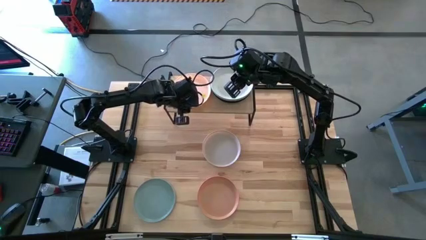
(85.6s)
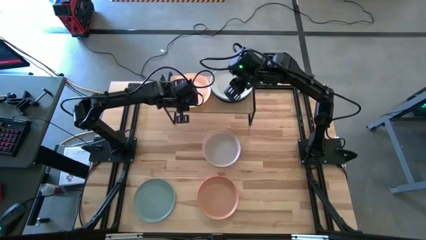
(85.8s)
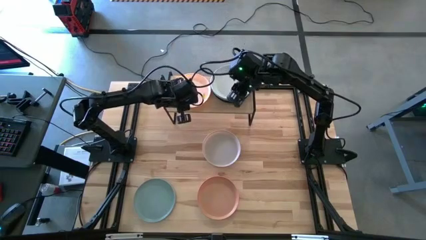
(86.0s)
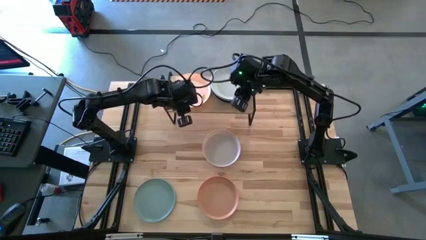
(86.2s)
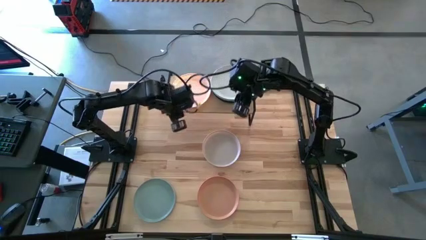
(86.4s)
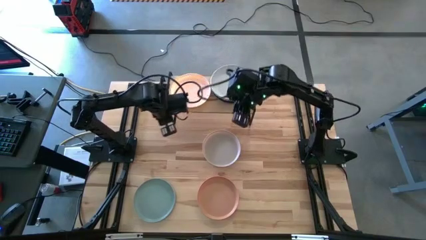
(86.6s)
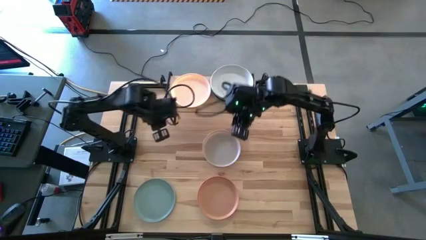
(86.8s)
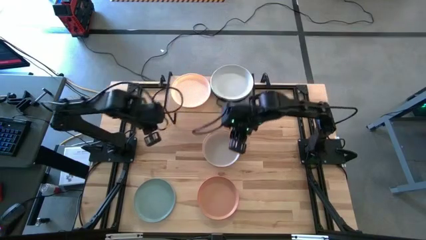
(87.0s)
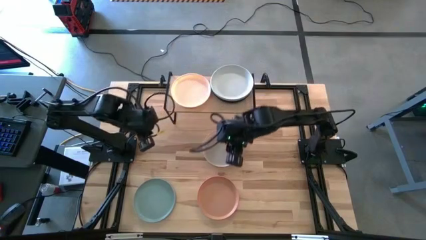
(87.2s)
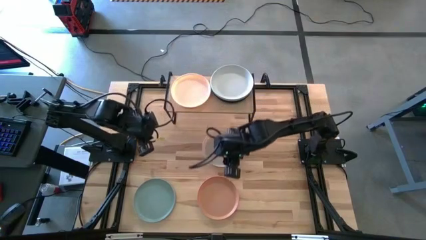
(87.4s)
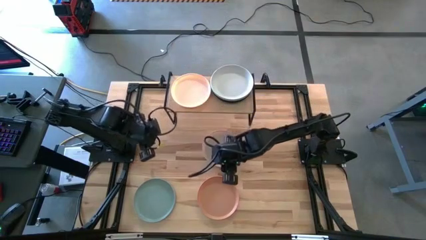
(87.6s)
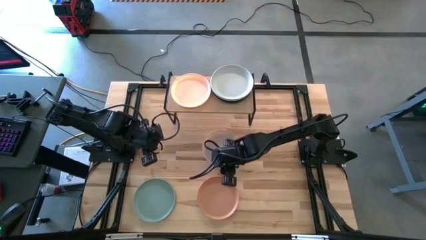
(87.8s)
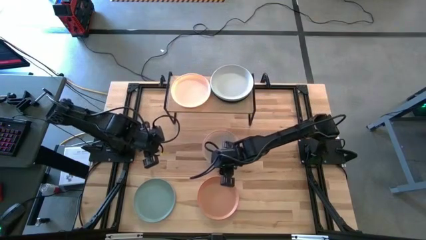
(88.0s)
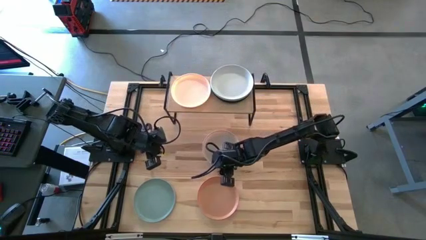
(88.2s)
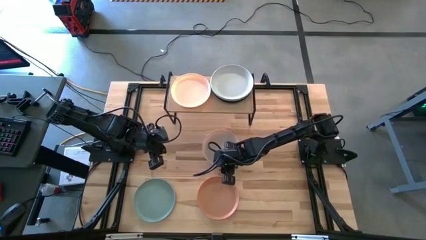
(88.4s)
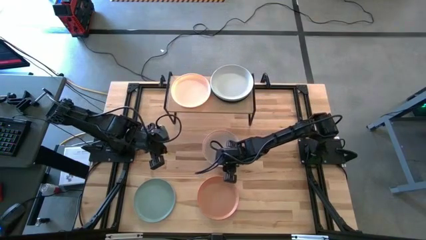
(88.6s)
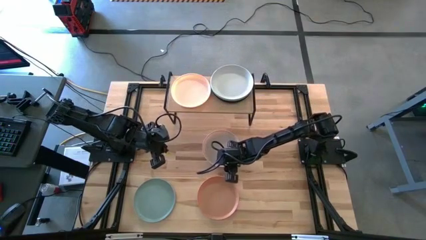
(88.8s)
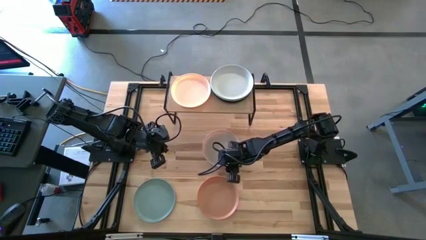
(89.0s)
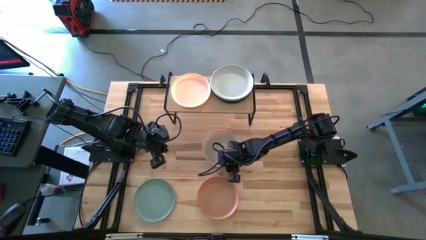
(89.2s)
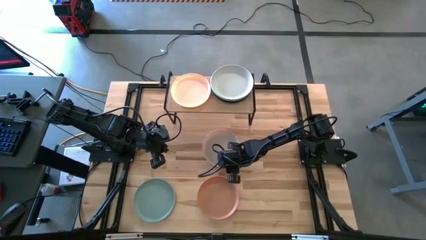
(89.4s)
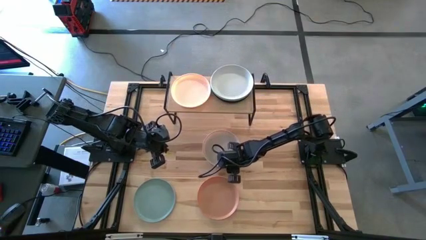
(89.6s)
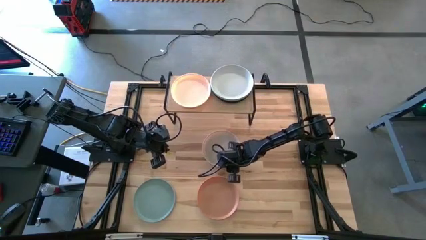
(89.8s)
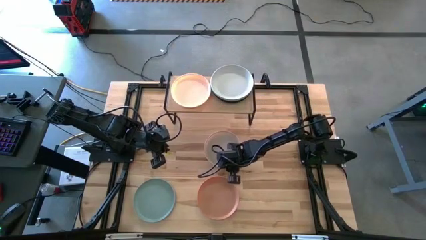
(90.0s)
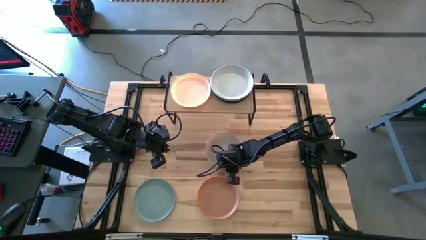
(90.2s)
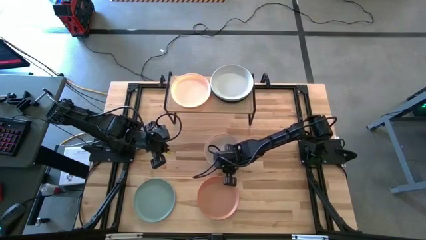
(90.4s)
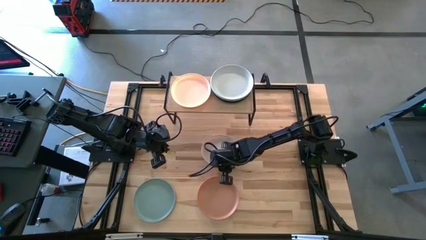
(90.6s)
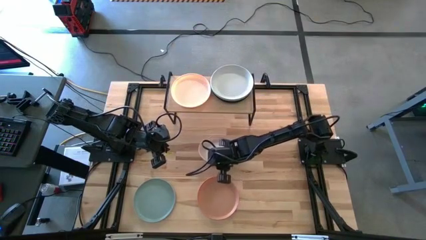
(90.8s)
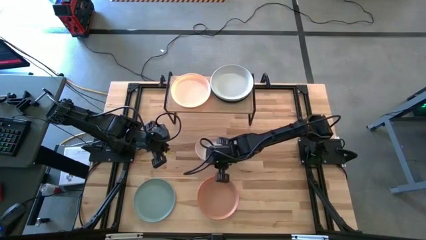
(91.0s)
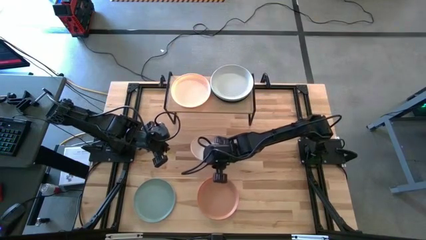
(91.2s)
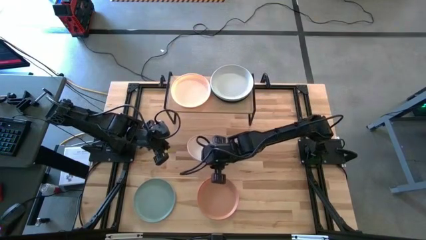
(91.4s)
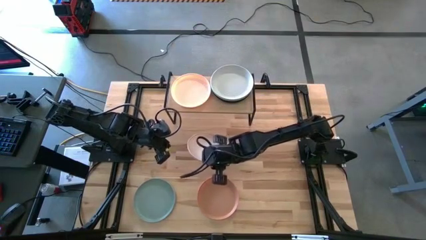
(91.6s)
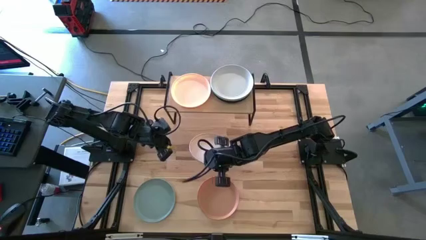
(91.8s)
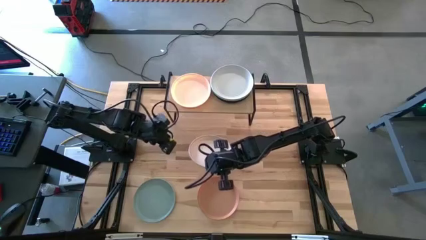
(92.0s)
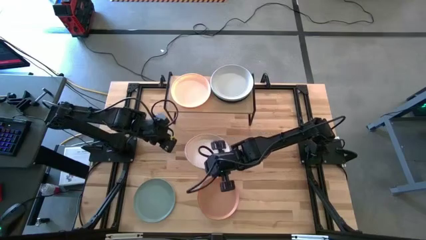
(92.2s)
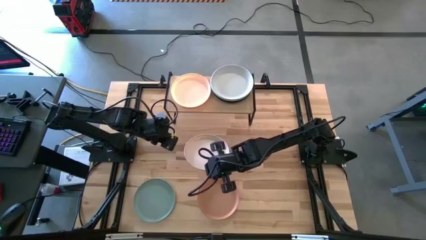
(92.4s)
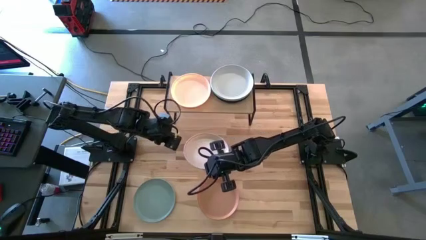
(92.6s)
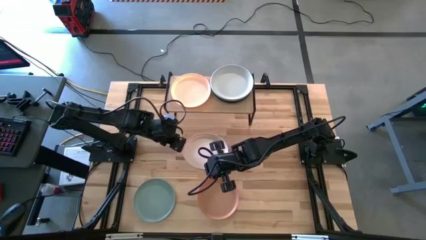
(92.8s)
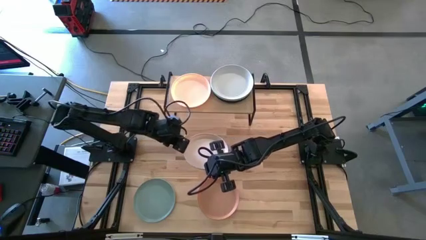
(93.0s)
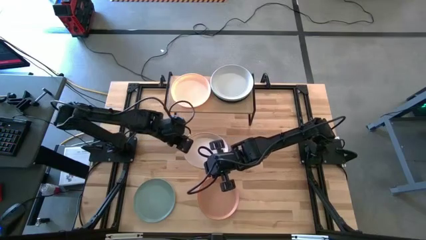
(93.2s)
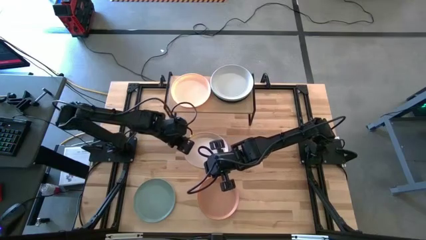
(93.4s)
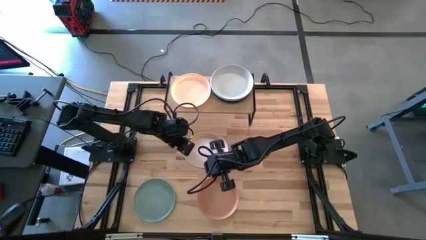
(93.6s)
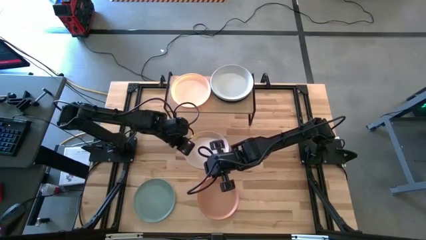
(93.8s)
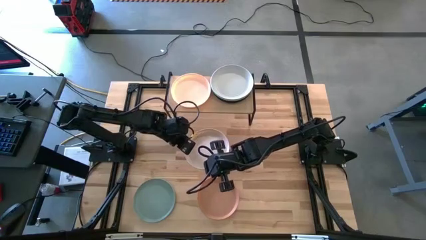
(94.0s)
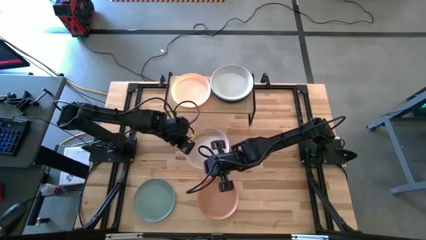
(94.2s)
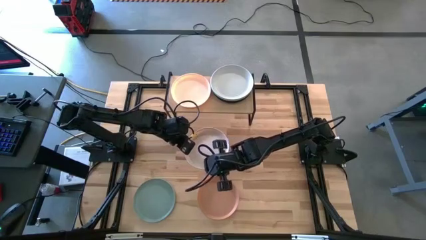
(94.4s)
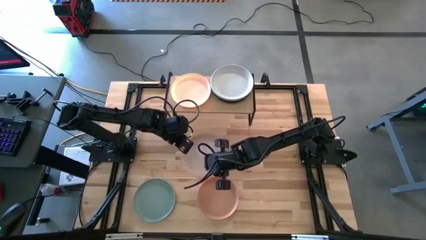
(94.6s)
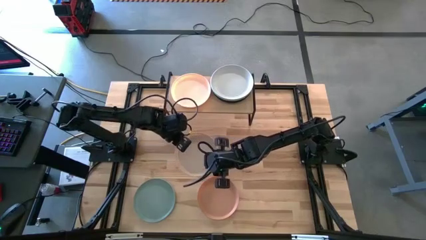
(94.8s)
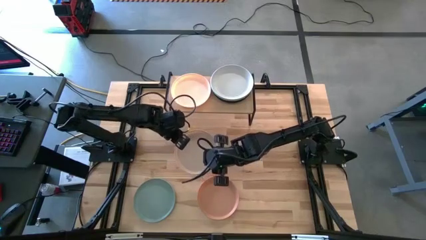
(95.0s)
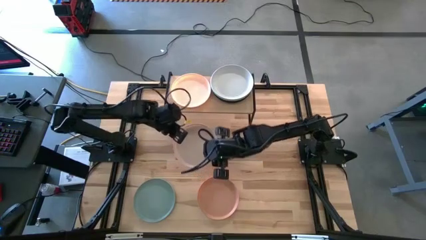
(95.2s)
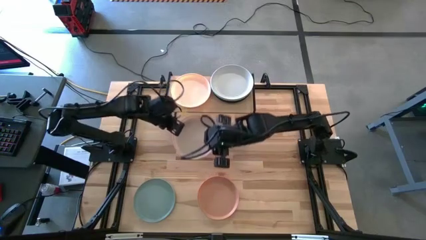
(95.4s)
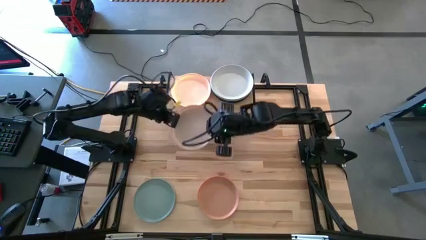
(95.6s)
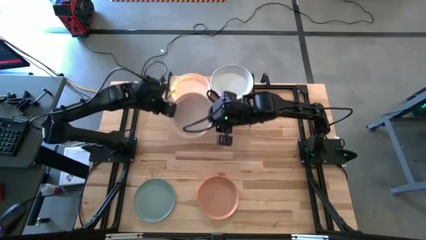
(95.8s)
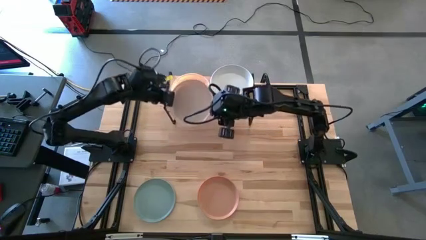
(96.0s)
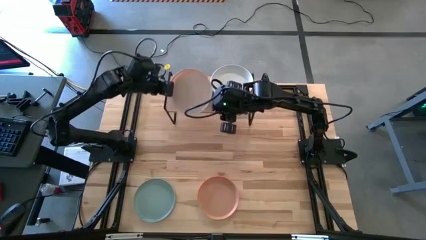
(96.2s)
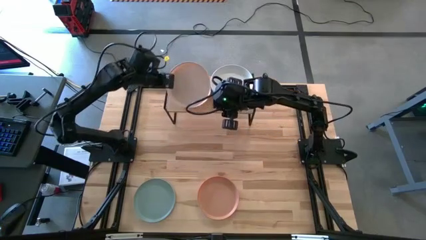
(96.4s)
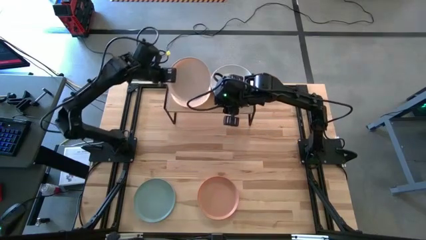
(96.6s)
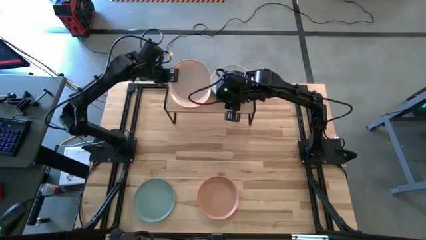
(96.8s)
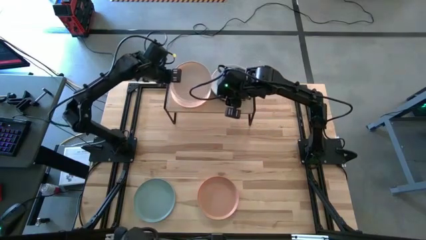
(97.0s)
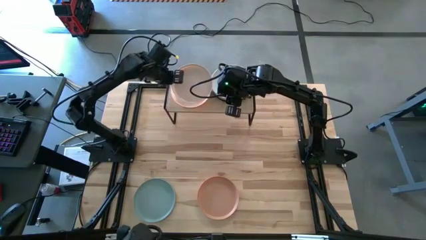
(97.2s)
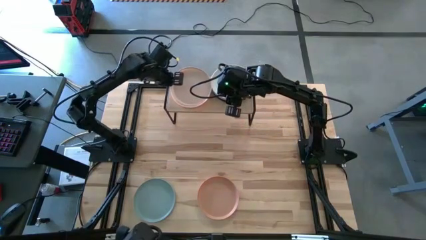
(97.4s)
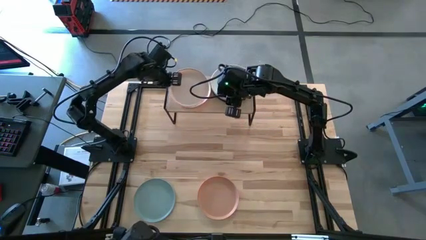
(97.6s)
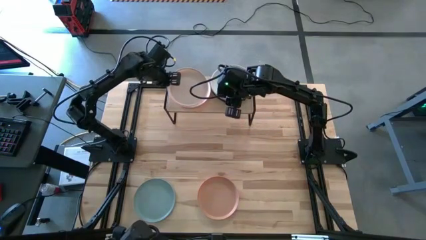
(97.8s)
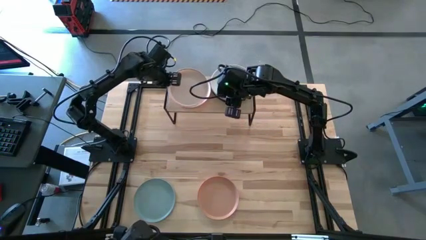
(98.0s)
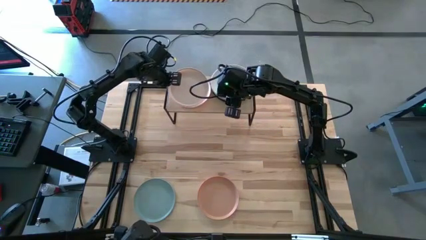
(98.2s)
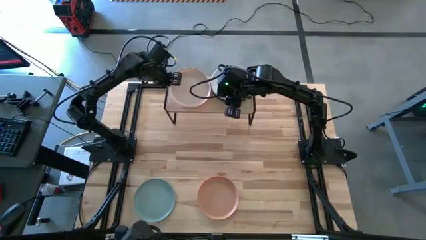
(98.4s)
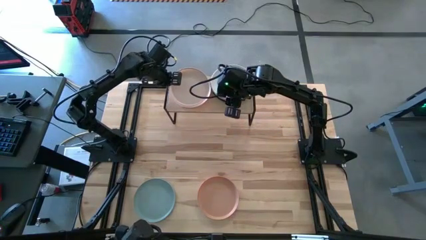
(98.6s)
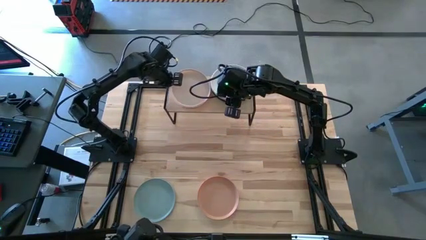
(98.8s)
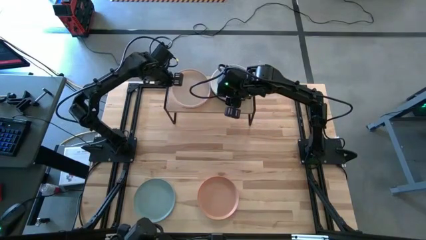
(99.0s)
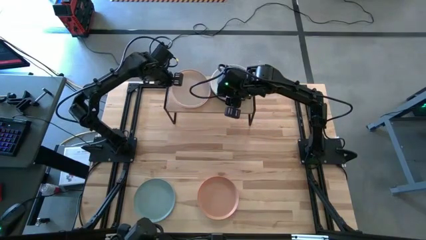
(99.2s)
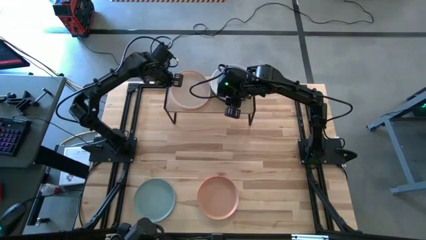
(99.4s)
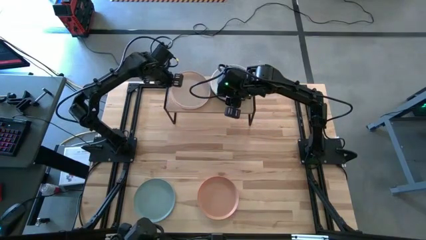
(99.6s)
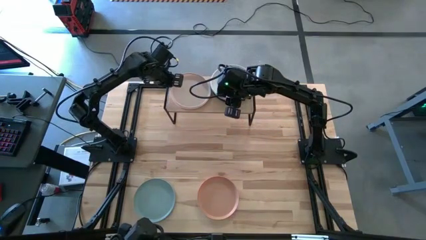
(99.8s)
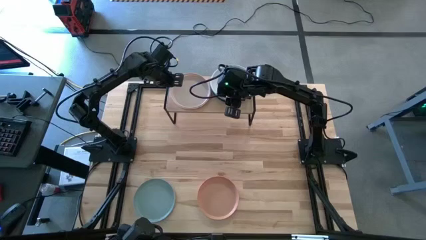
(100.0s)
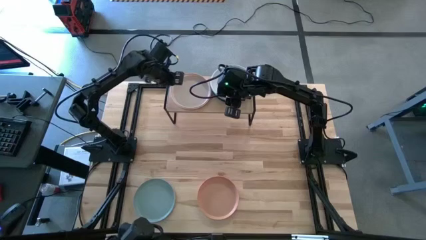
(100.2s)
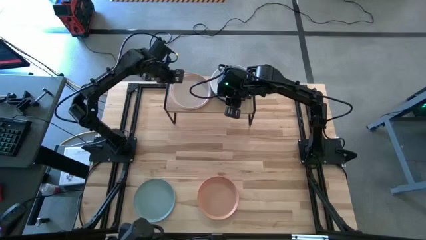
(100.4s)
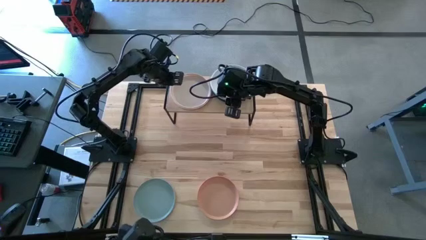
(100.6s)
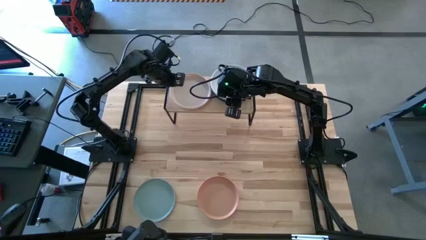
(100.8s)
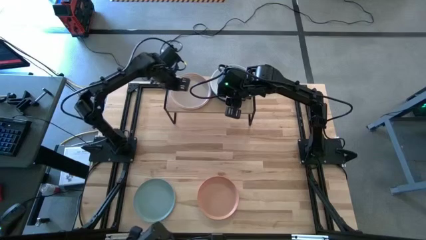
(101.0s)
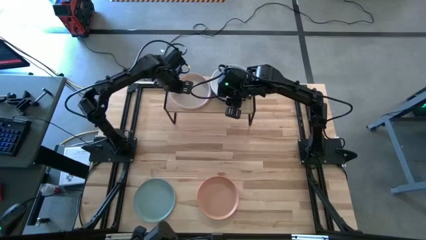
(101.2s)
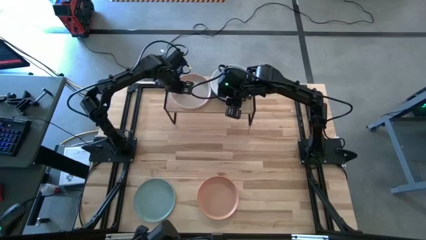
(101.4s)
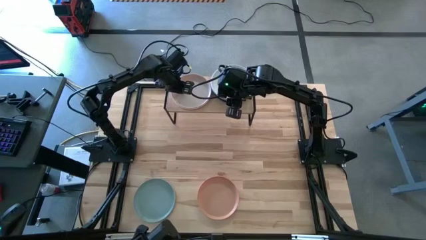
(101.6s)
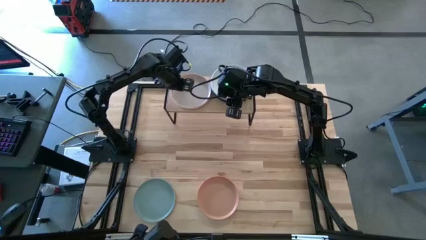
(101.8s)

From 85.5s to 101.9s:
Task: Place and stack plates onto a shelf
Stack the gray plate on top of the light red plate
